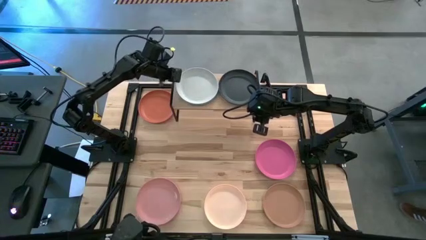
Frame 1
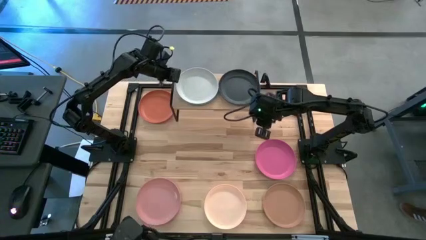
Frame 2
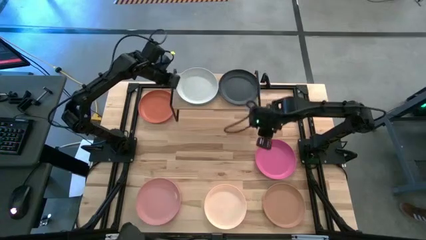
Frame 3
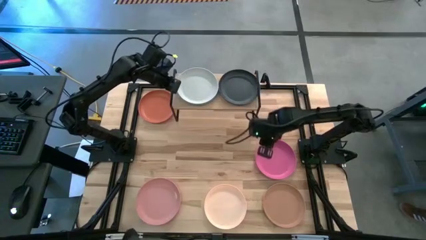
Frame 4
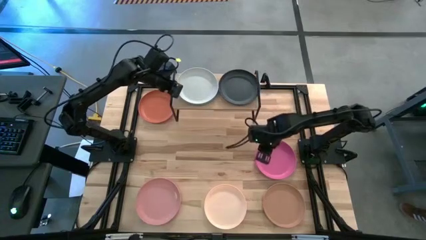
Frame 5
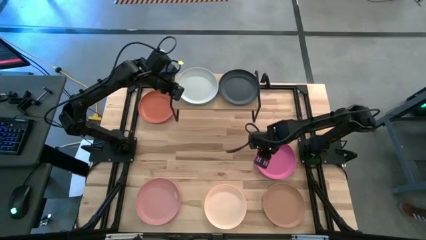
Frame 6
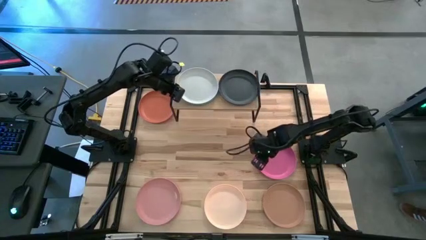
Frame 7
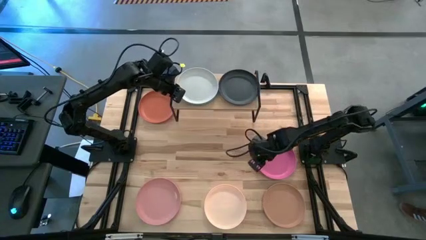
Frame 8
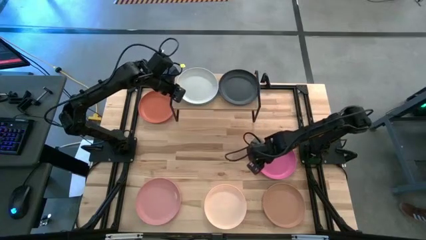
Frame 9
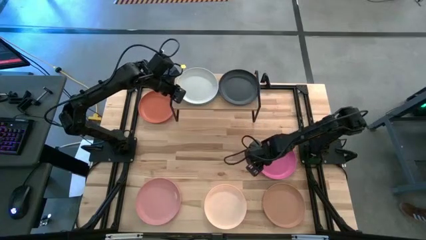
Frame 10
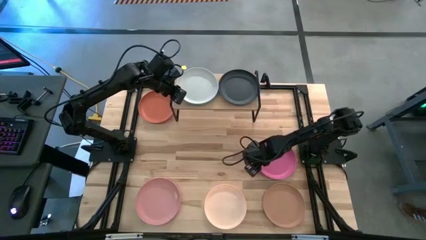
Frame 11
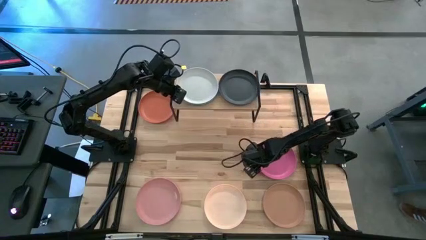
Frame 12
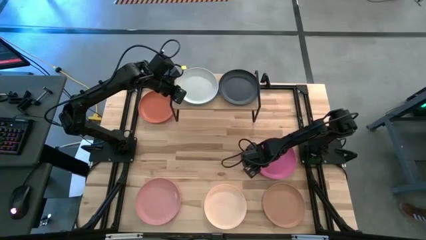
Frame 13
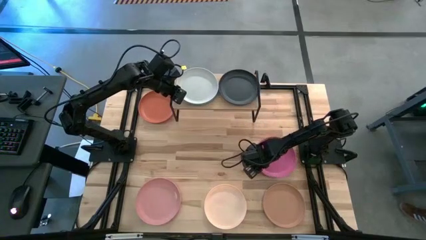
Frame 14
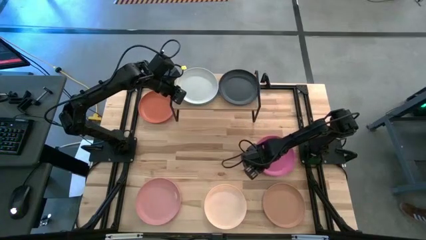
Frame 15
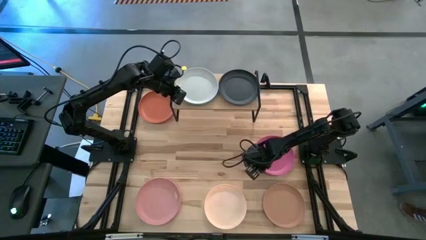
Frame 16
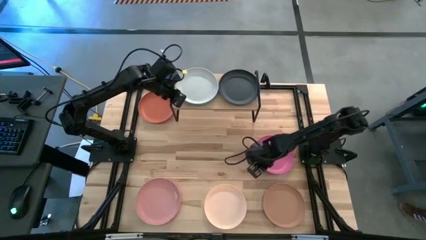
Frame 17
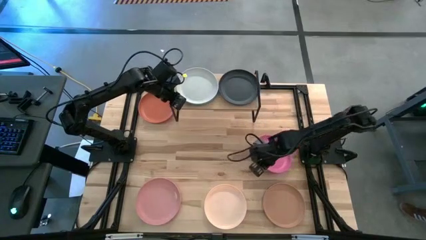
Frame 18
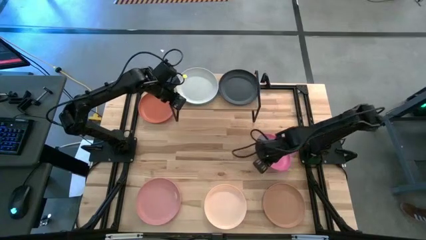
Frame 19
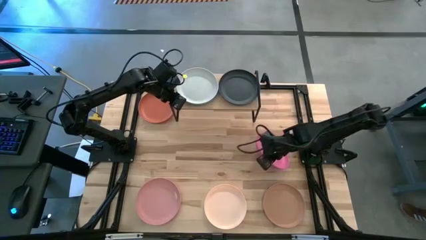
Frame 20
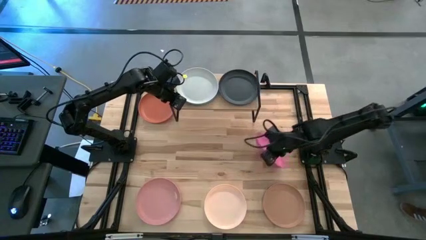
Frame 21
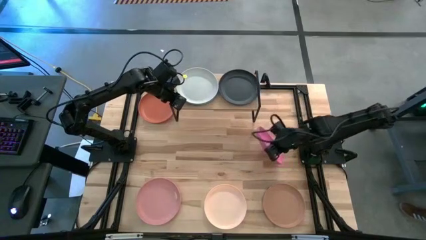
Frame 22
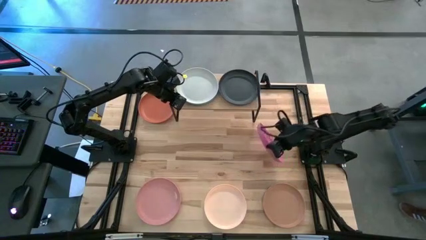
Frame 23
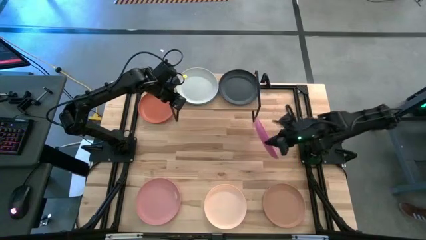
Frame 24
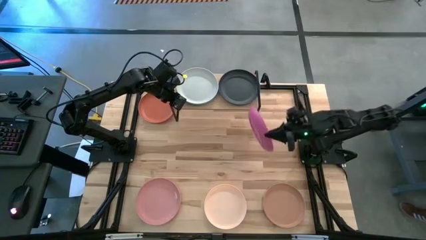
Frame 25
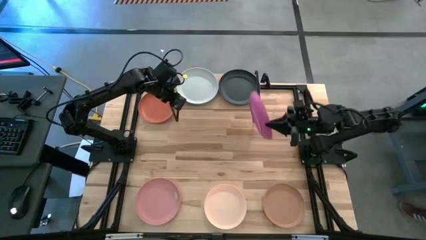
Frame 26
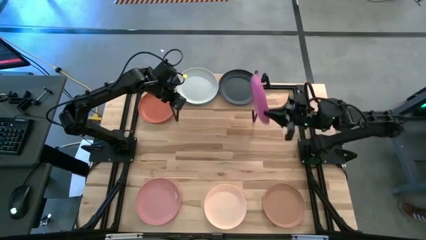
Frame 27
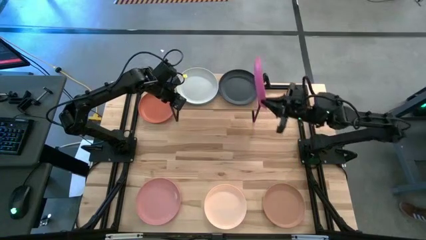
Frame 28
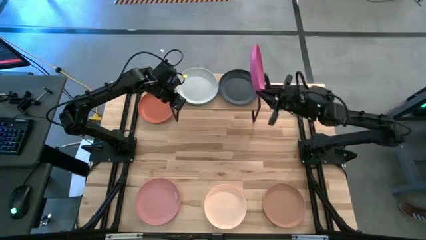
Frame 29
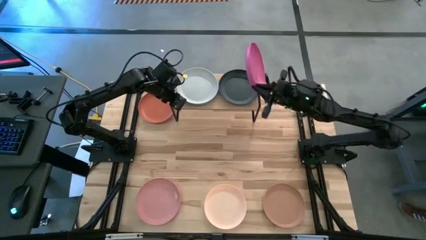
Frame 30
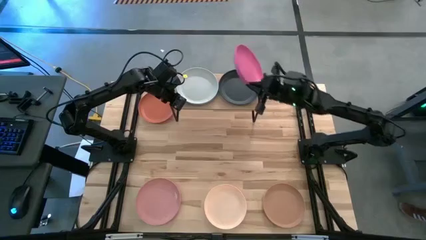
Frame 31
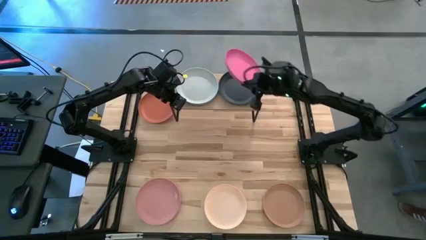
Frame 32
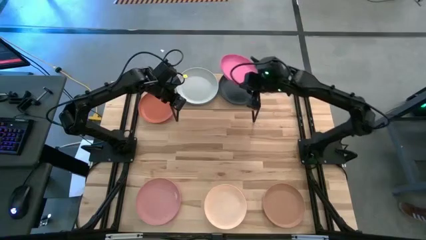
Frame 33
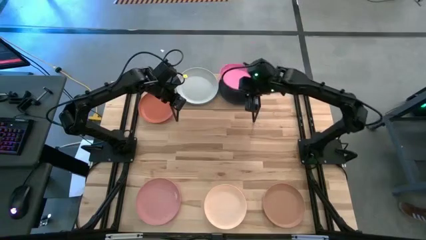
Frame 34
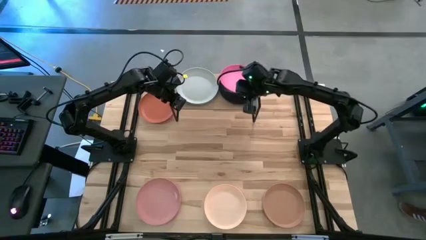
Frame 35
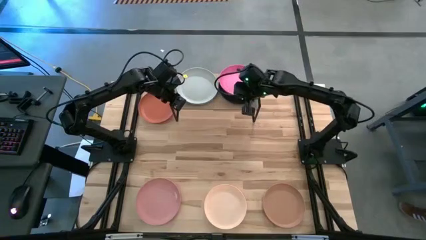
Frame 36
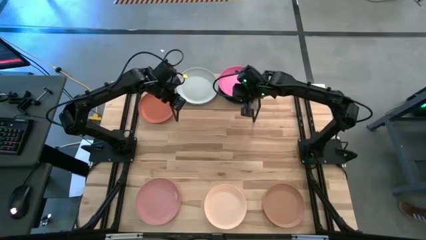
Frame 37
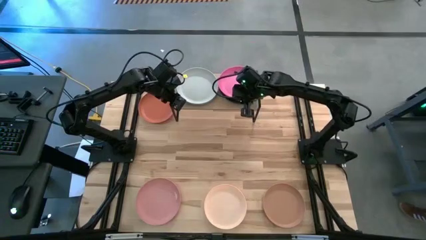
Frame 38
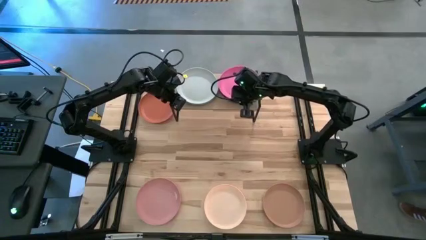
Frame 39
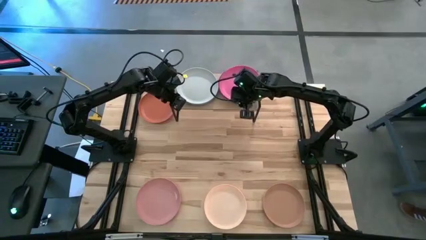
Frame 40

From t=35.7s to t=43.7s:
Task: Place and stack plates onto a shelf
Stack the pink plate on top of the dark green plate on the shelf

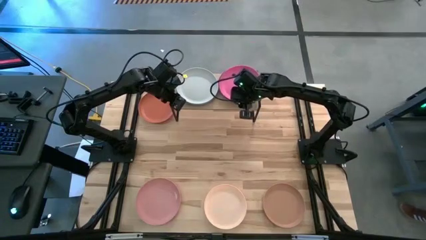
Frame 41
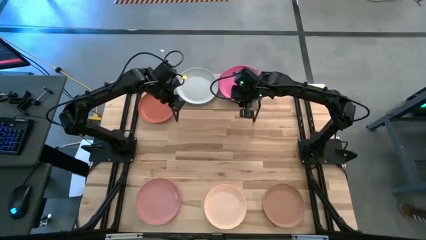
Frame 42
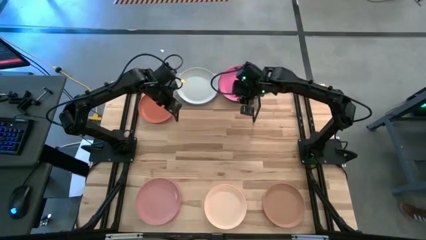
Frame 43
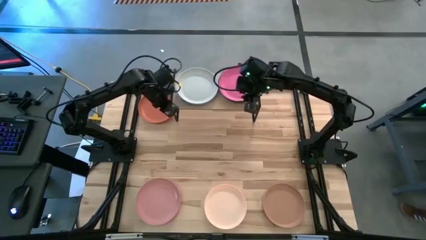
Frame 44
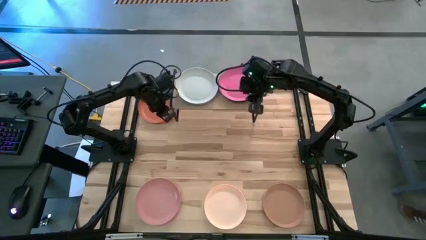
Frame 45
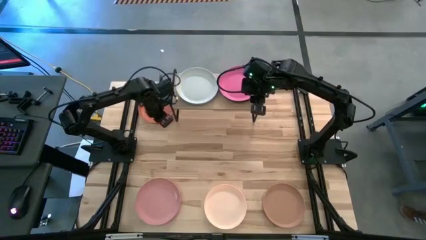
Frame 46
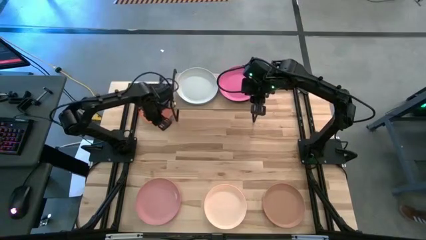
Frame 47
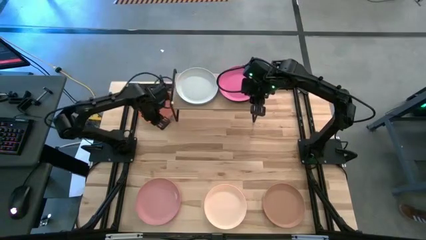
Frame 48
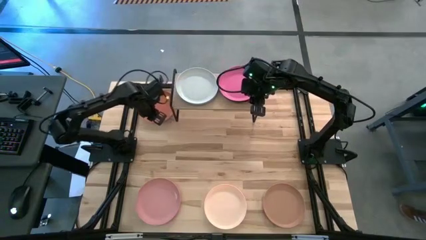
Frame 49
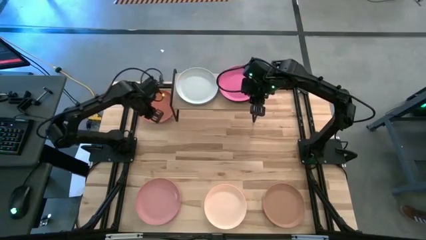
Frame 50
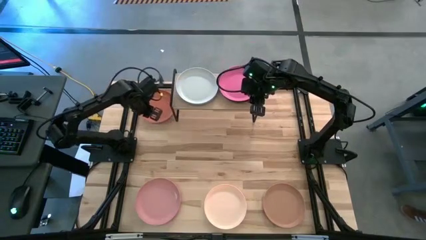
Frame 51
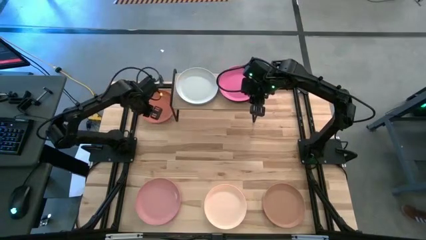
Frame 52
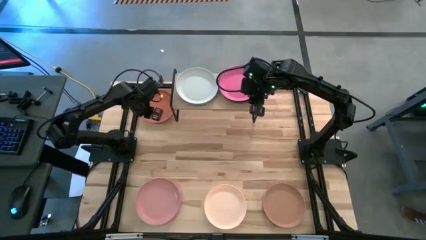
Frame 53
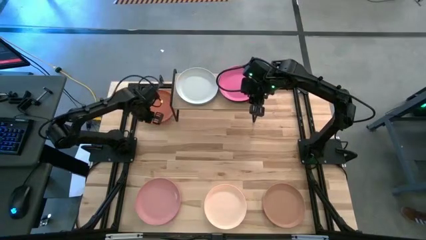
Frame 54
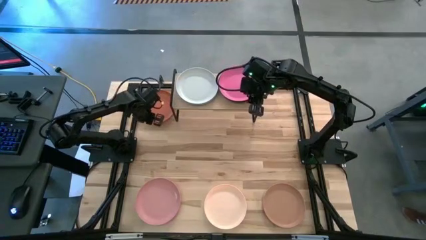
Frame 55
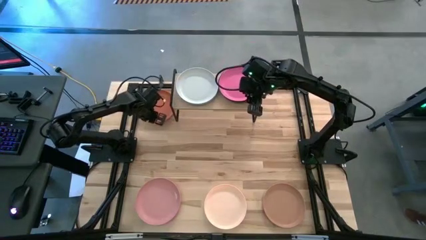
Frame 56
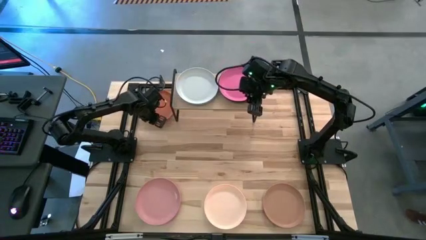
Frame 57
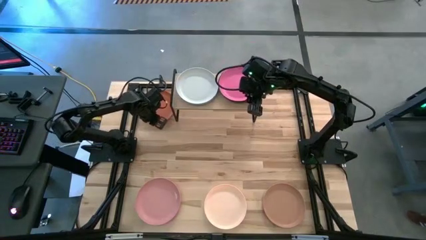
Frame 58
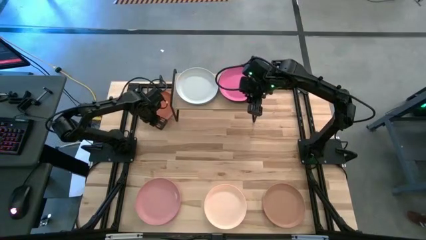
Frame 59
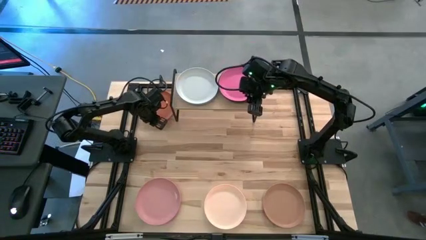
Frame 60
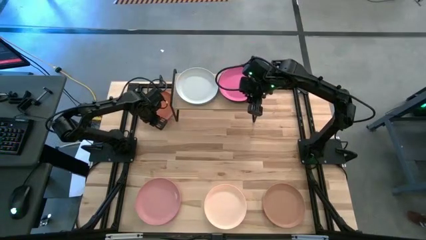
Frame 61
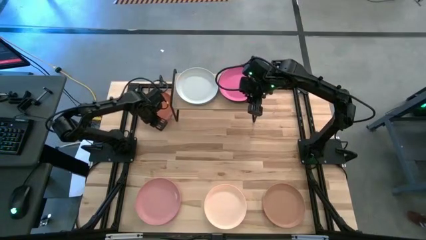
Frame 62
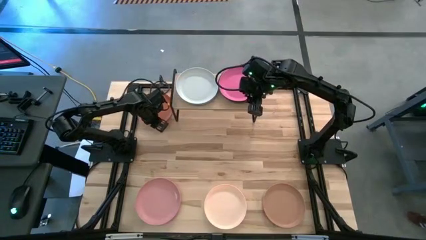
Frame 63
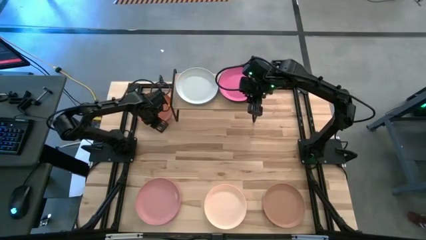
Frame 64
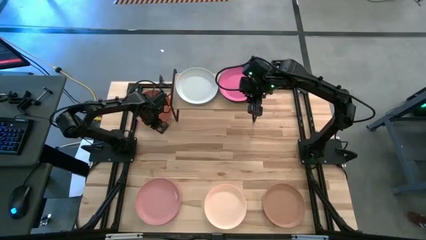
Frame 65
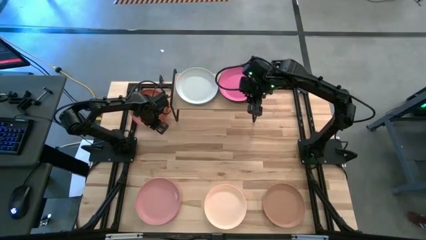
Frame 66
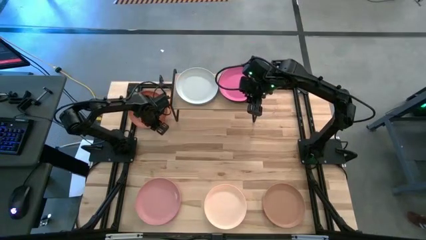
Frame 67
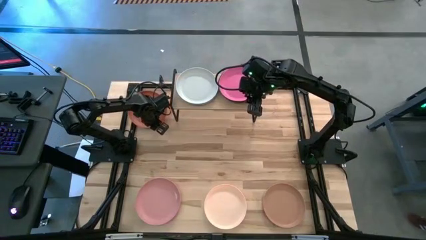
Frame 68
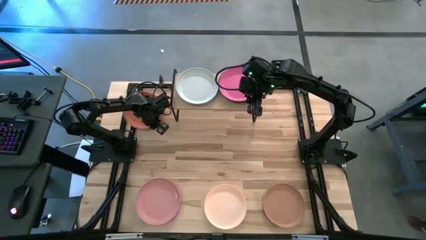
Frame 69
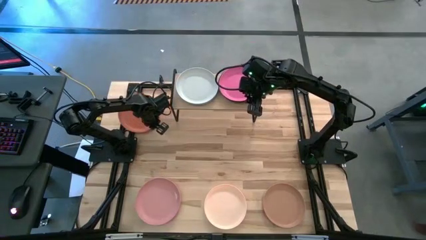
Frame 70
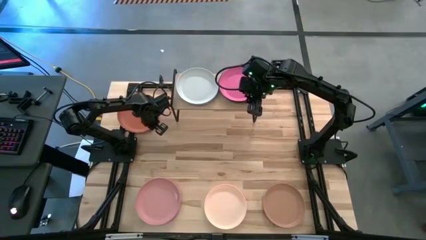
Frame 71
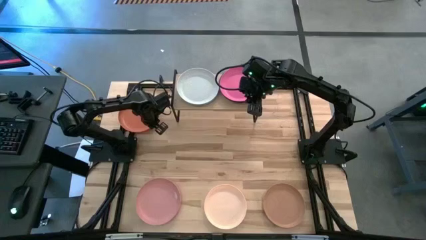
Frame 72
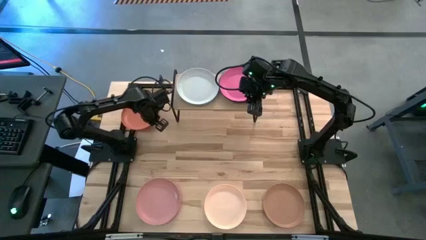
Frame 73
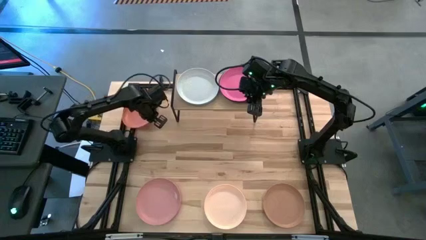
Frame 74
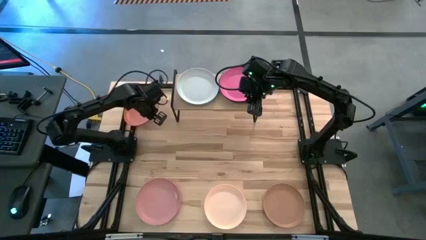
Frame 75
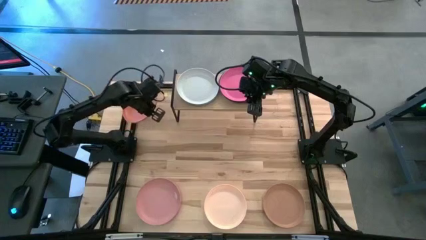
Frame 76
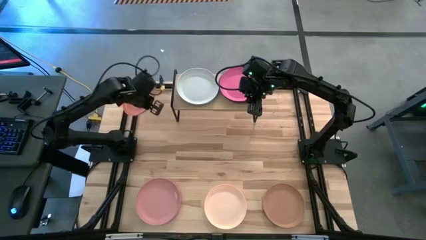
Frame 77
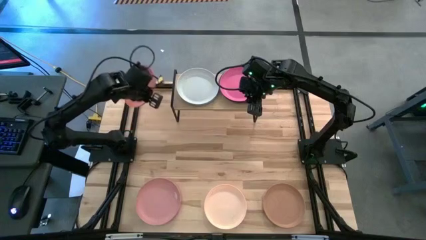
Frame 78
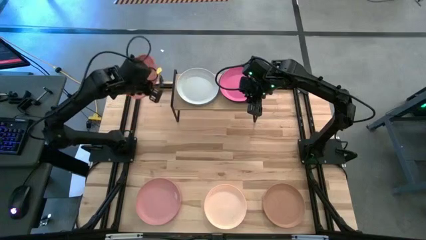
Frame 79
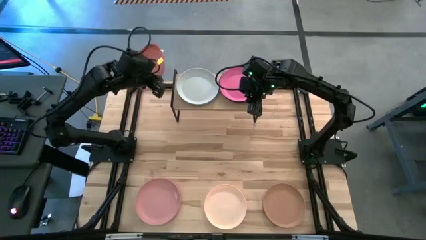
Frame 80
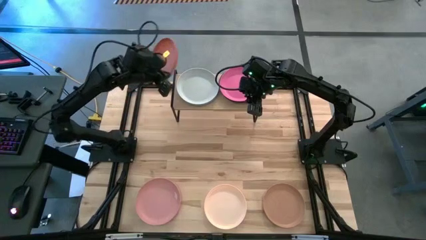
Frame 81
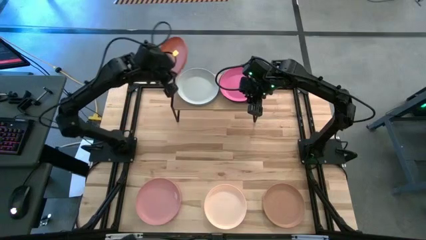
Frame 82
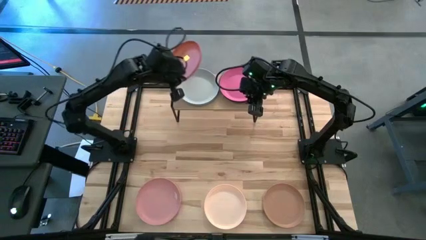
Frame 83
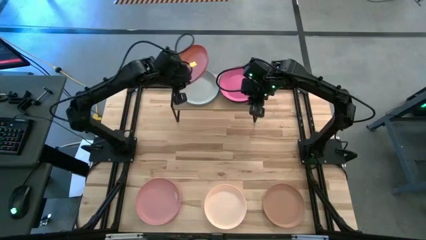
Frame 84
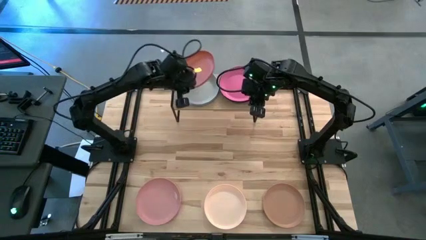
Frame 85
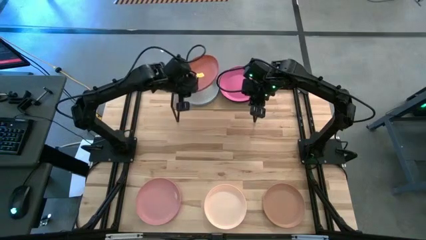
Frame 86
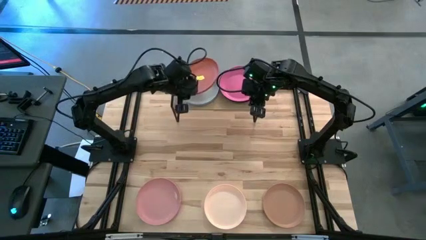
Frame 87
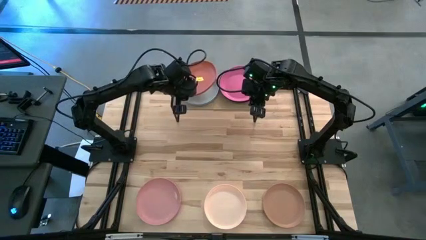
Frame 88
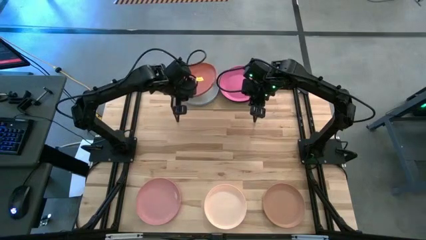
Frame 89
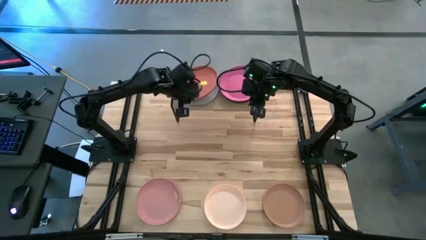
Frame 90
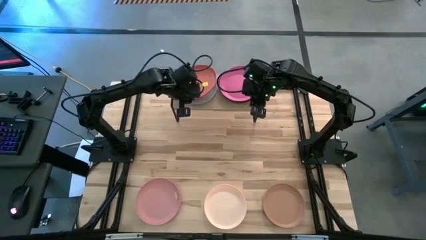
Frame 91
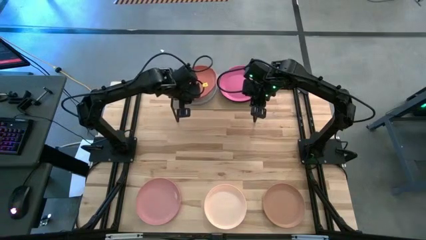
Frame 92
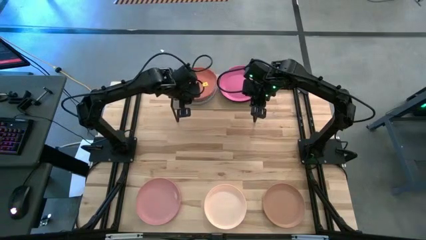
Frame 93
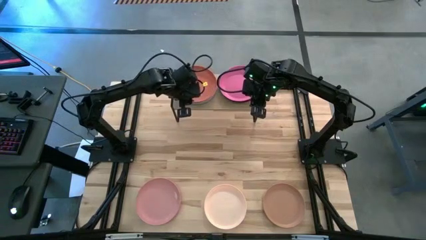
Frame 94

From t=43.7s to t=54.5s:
Stack the orange plate on top of the white plate on the shelf
